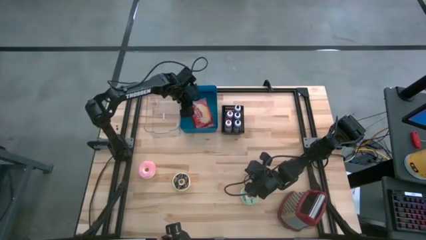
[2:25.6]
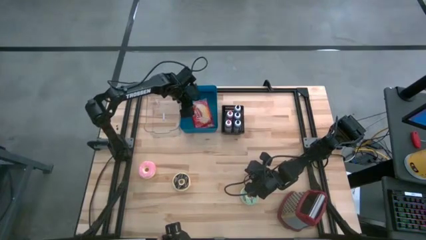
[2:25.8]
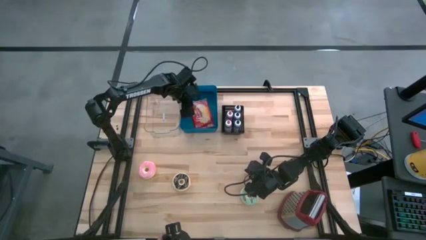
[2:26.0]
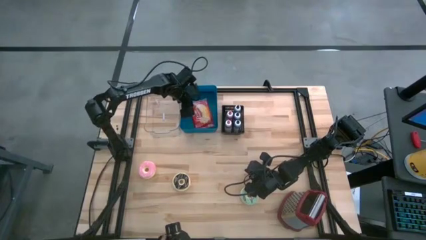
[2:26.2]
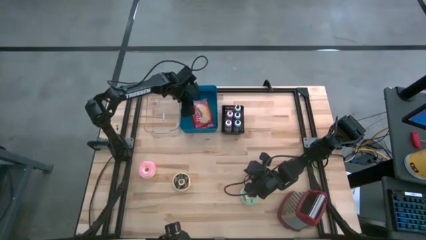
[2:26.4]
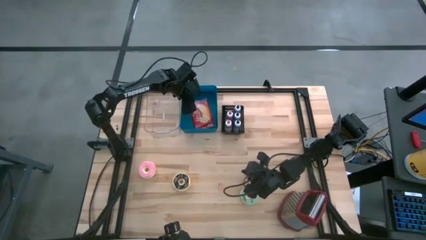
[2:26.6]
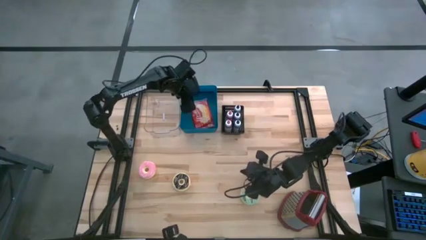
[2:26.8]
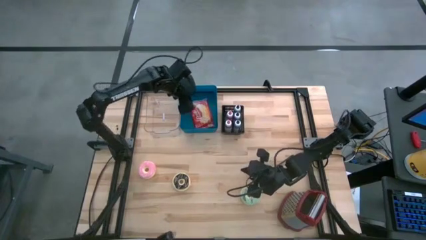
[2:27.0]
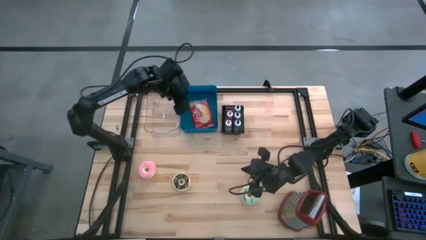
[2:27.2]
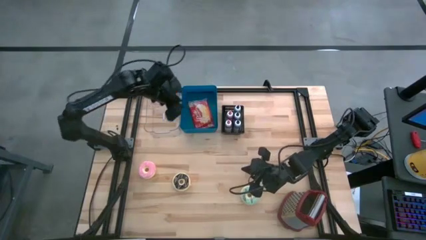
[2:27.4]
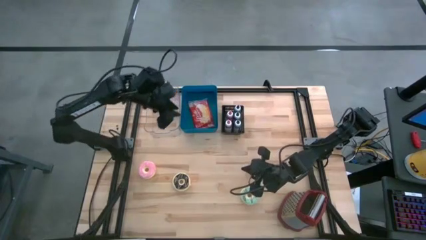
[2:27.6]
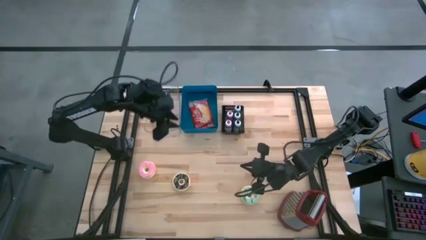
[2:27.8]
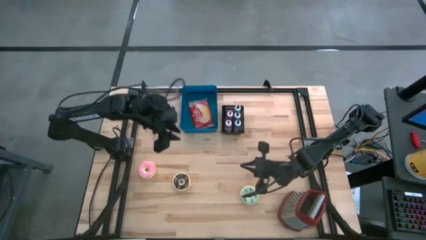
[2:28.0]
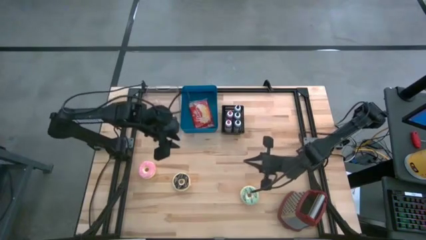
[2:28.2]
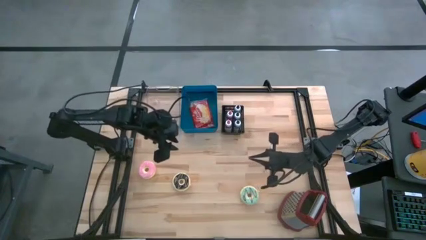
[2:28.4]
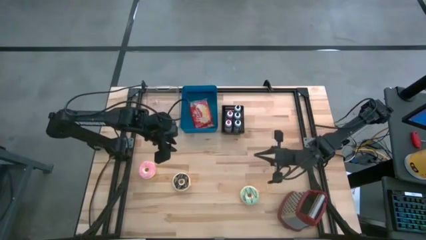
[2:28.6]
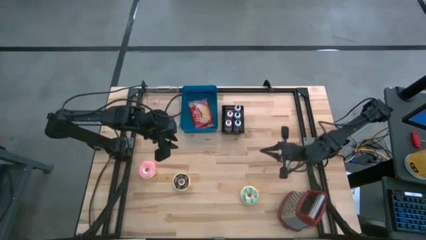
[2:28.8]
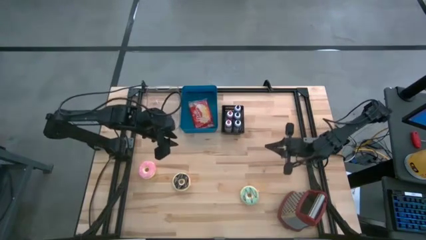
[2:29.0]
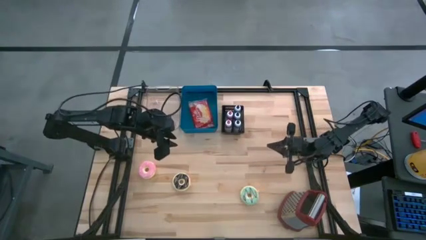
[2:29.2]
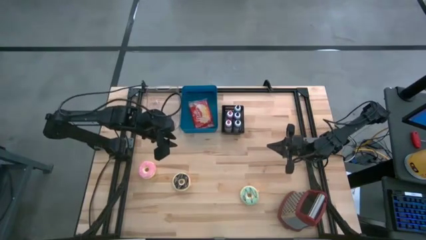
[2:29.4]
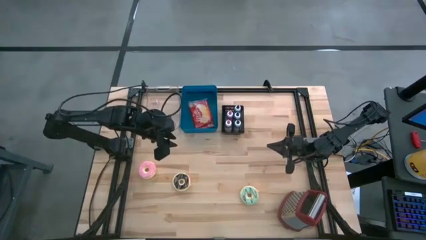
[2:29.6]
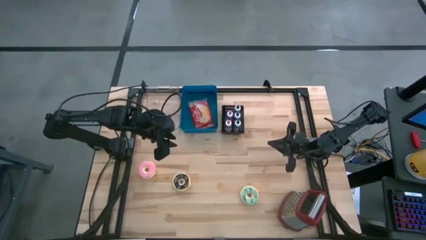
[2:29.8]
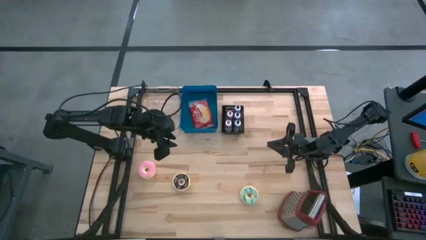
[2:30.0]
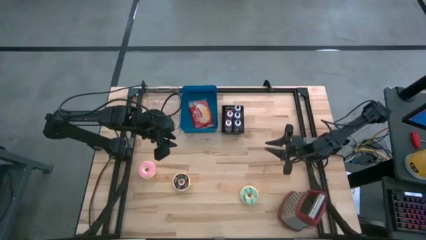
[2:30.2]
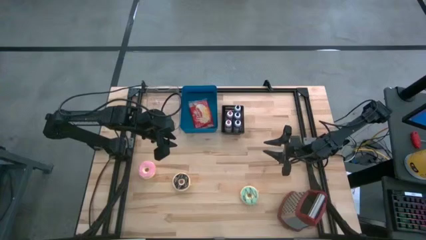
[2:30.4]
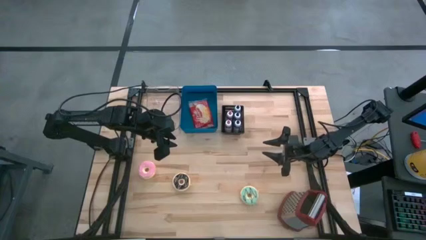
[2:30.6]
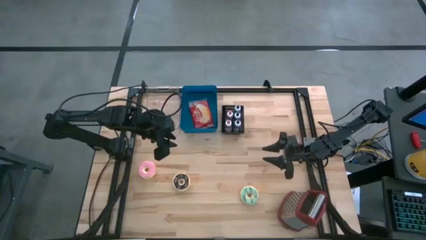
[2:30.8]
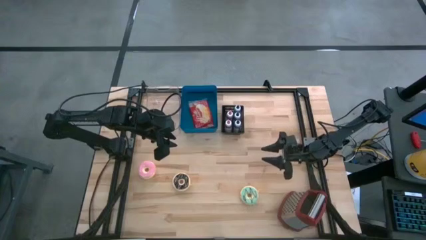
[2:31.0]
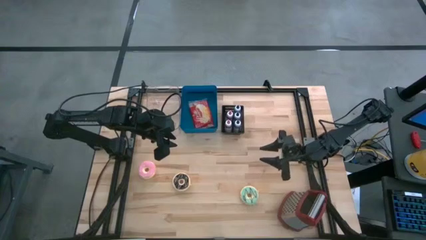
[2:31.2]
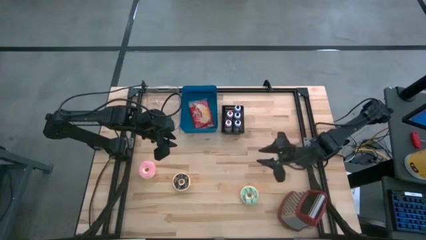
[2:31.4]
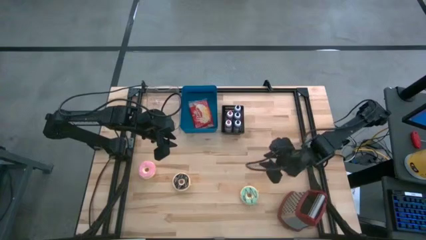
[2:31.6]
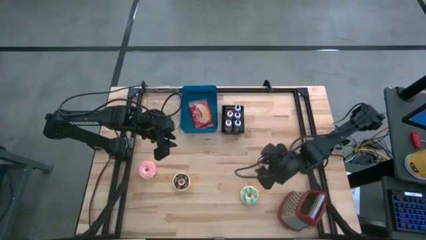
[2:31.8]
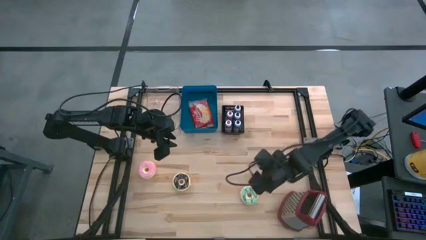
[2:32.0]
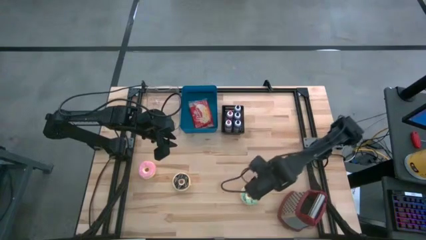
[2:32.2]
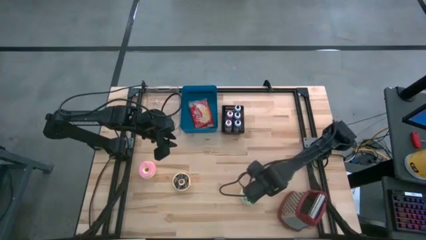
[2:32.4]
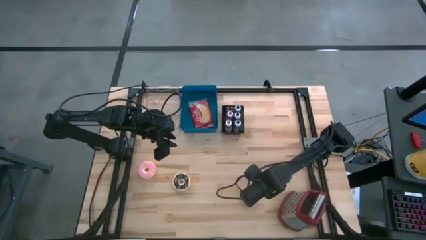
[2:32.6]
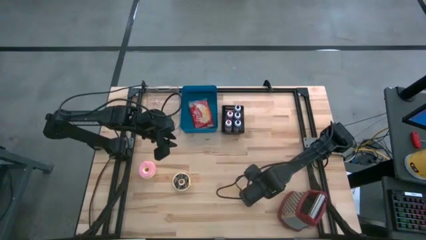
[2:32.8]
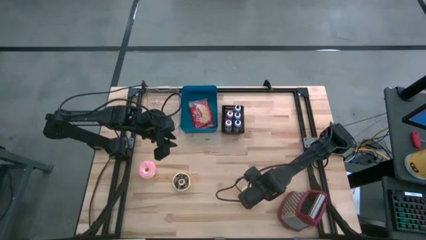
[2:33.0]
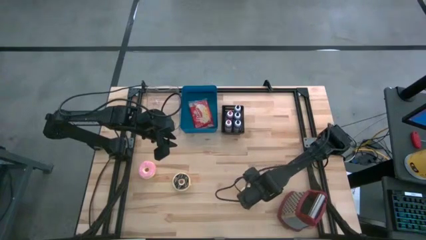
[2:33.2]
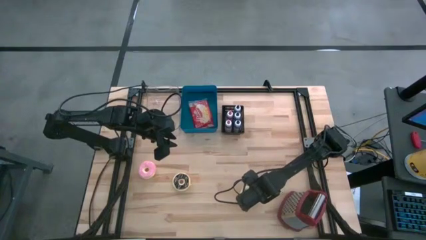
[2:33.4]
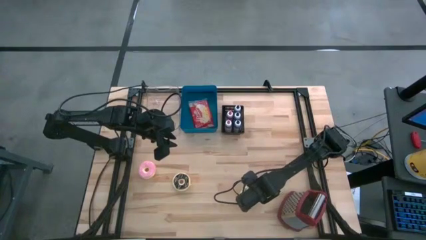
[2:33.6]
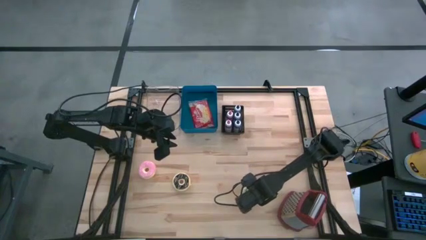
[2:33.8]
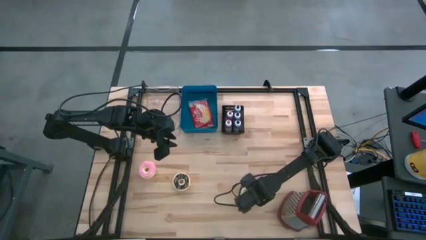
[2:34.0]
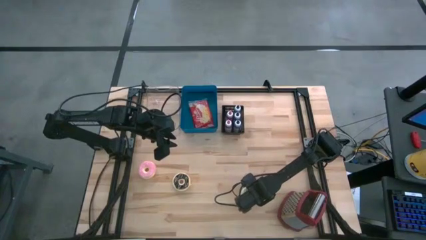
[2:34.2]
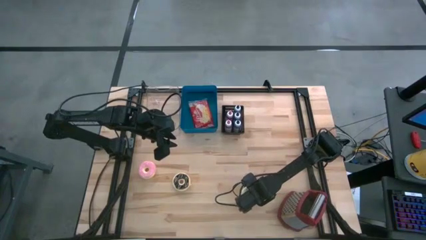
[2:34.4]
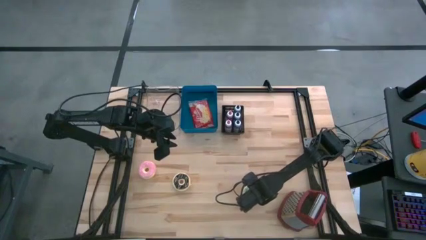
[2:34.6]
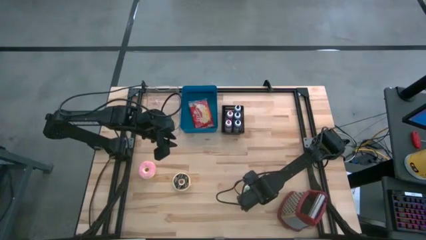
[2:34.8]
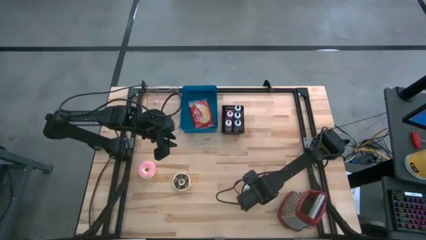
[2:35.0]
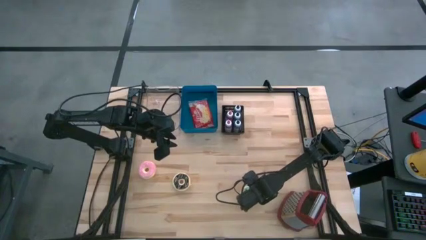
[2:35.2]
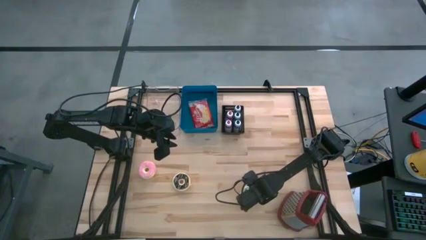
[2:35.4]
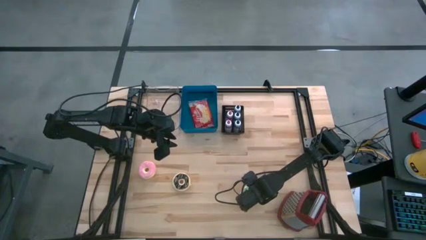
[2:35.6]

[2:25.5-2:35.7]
Put the green donut into the transparent bin
